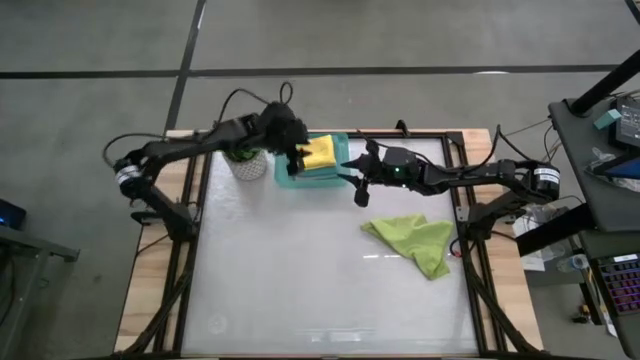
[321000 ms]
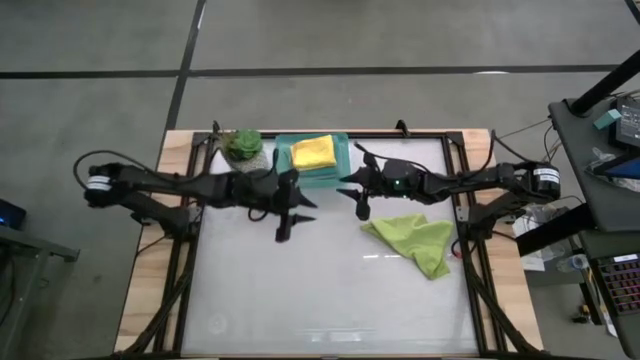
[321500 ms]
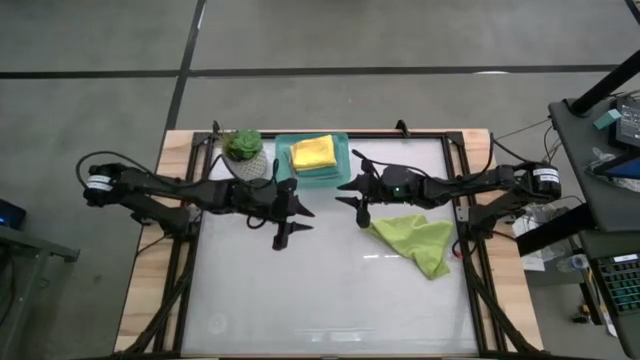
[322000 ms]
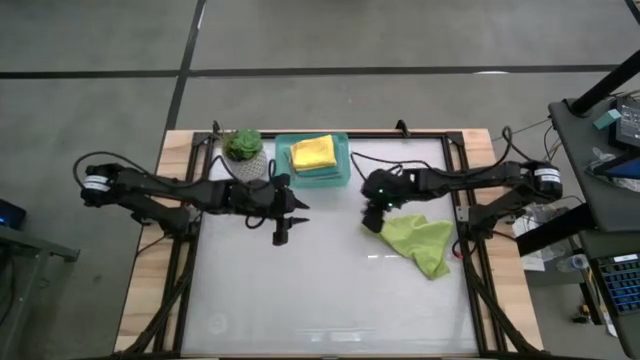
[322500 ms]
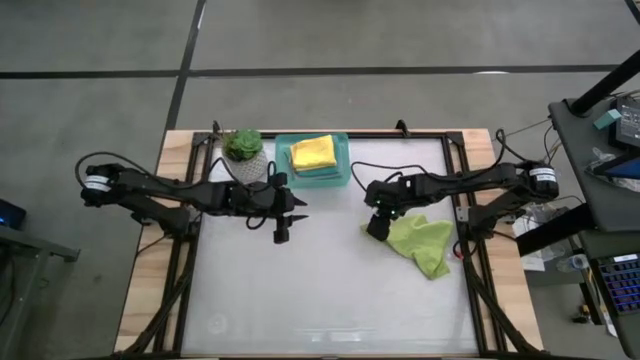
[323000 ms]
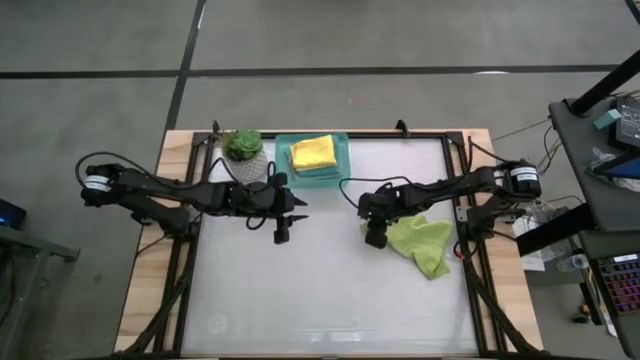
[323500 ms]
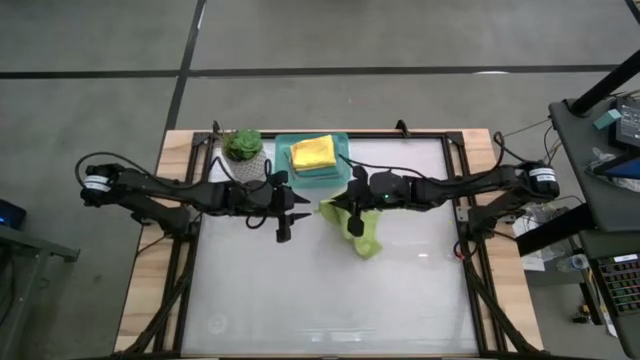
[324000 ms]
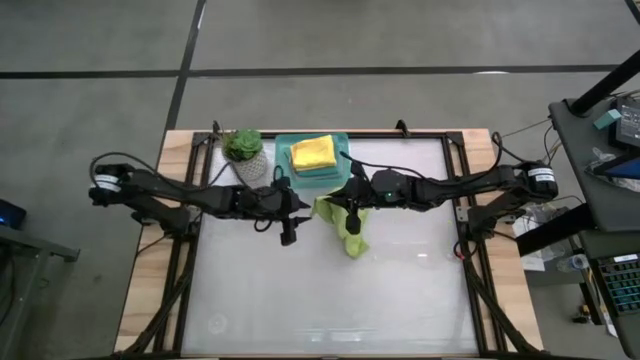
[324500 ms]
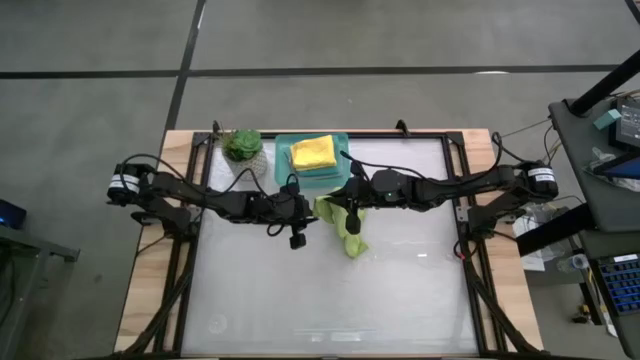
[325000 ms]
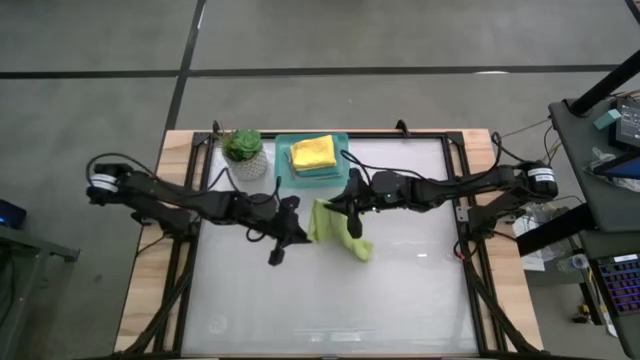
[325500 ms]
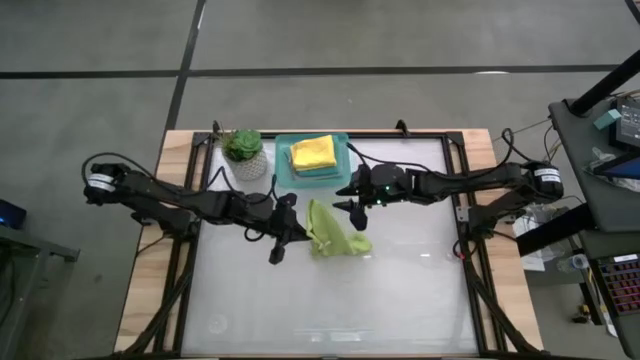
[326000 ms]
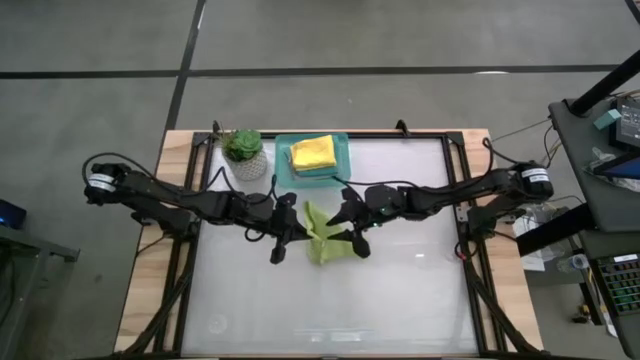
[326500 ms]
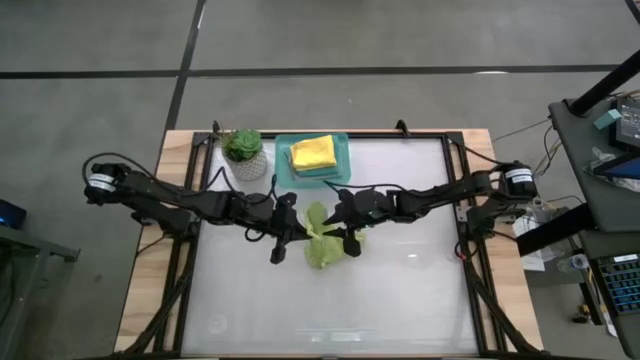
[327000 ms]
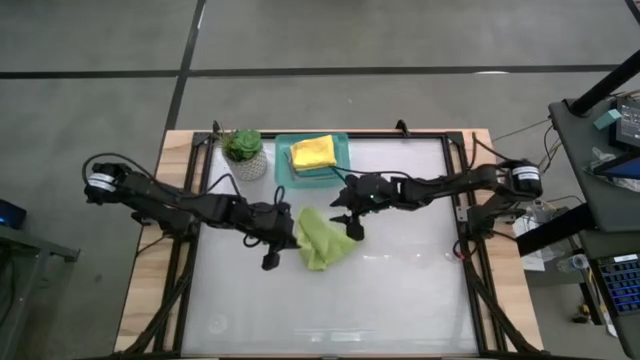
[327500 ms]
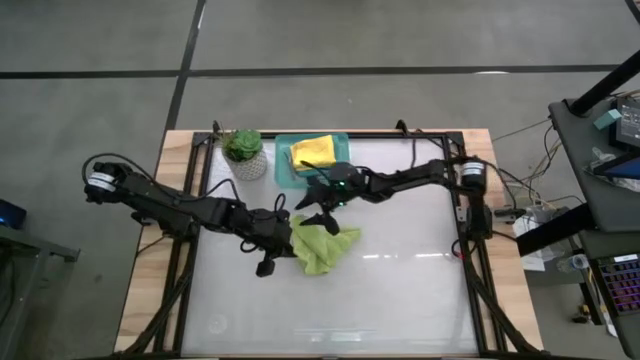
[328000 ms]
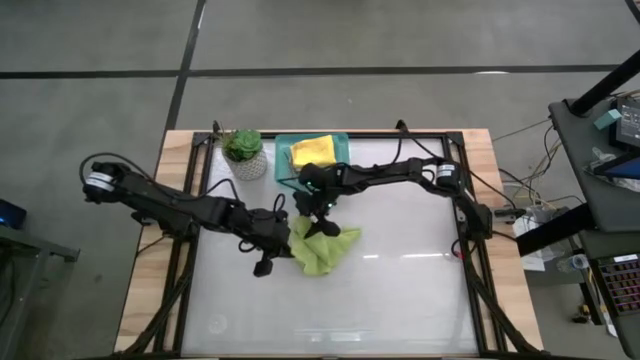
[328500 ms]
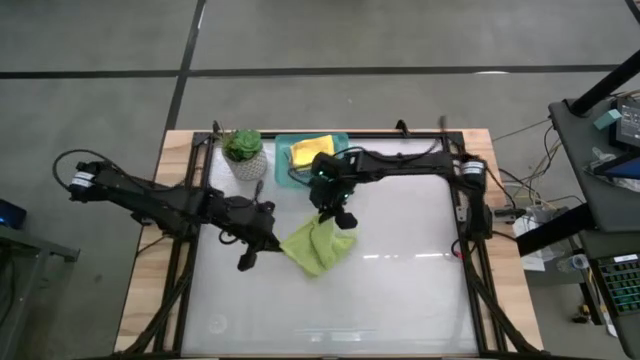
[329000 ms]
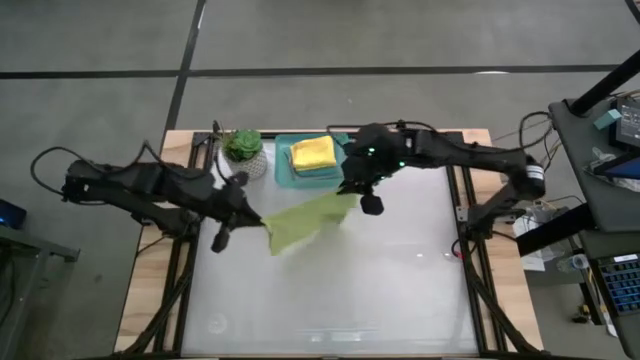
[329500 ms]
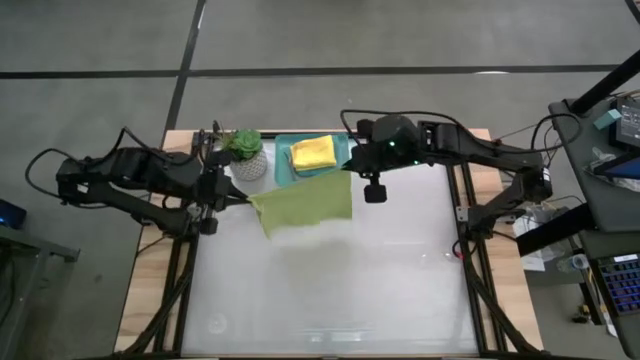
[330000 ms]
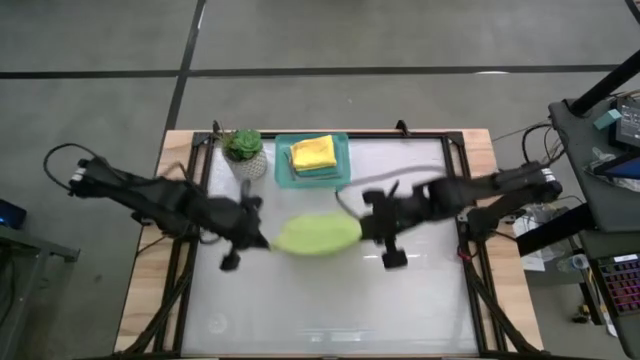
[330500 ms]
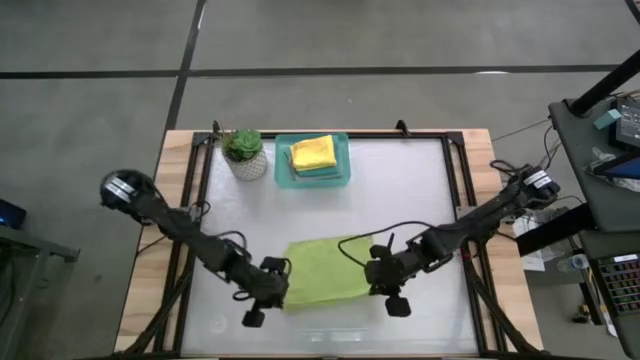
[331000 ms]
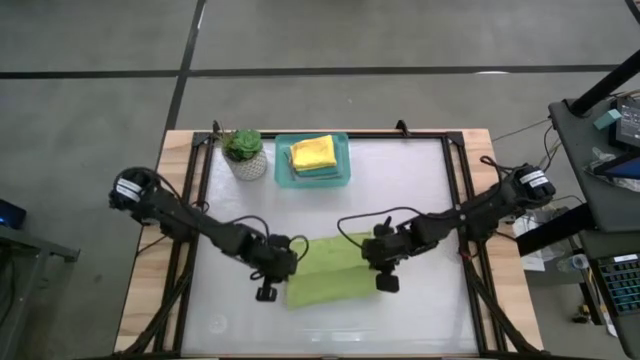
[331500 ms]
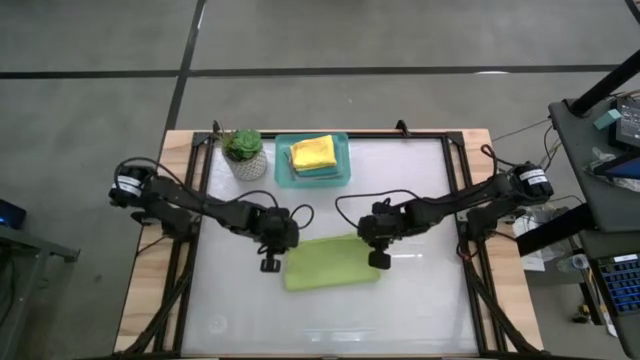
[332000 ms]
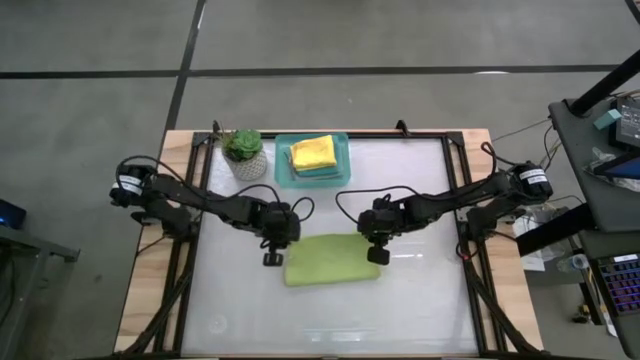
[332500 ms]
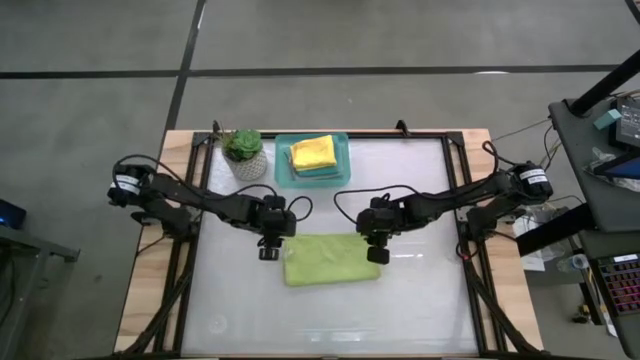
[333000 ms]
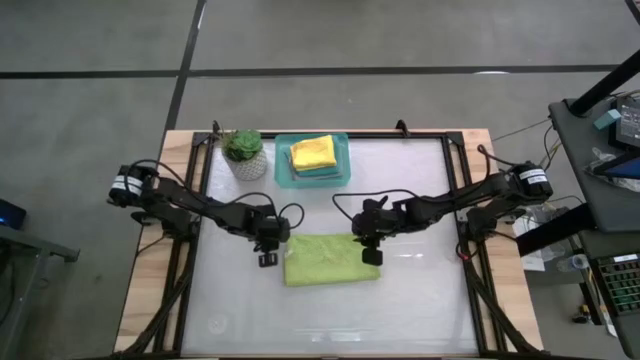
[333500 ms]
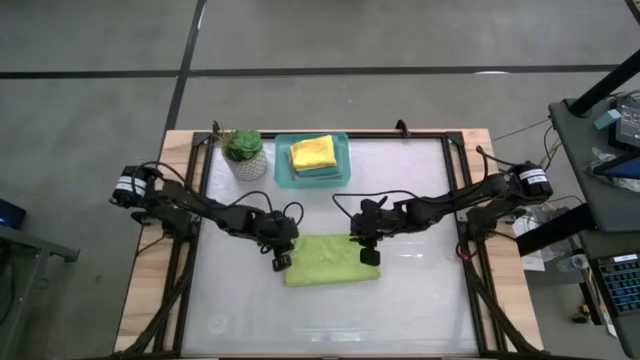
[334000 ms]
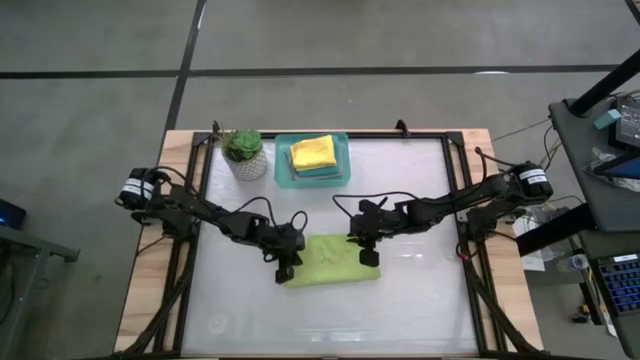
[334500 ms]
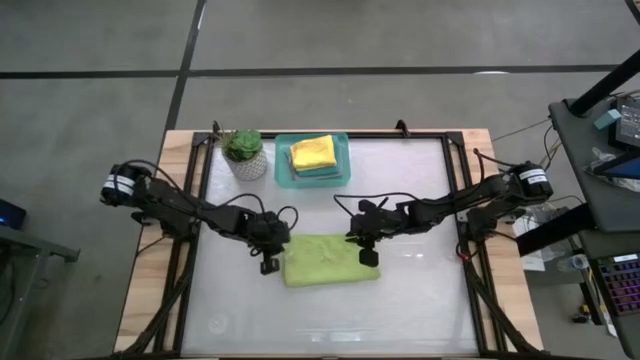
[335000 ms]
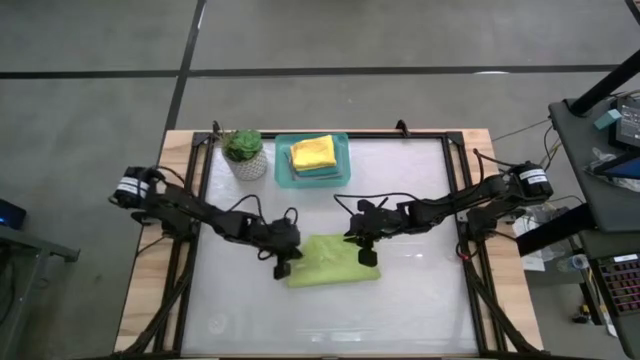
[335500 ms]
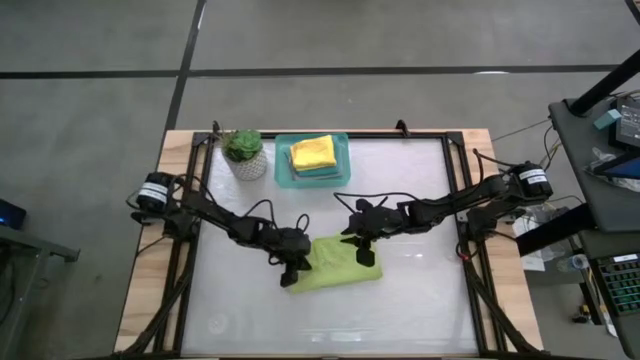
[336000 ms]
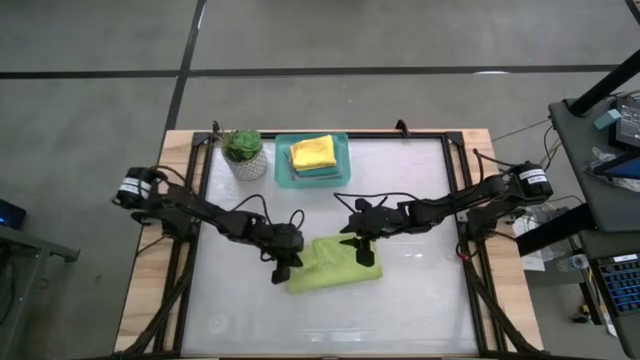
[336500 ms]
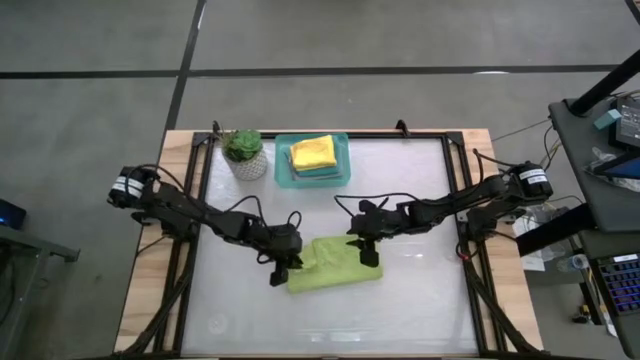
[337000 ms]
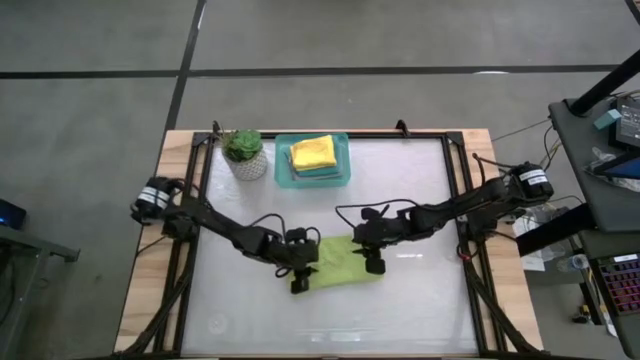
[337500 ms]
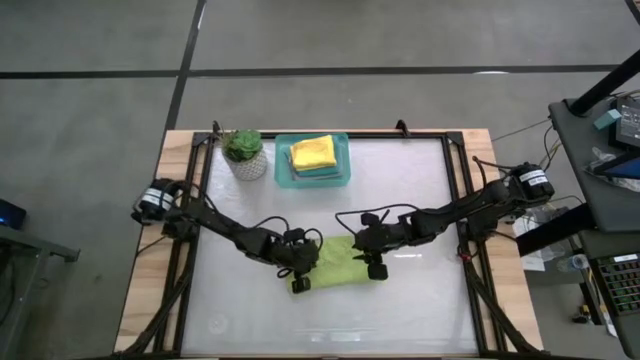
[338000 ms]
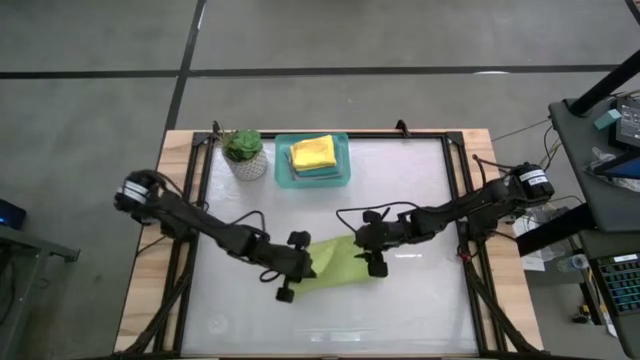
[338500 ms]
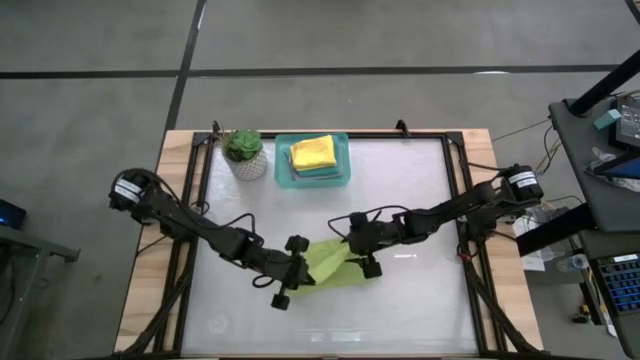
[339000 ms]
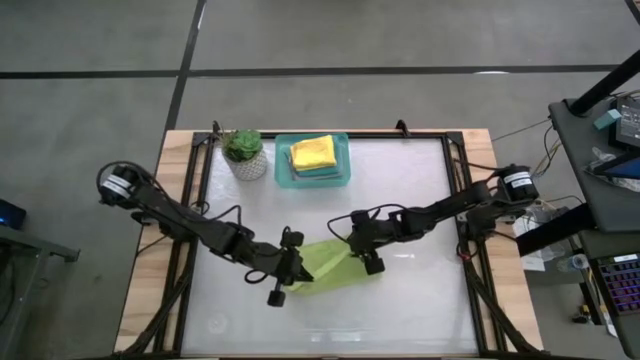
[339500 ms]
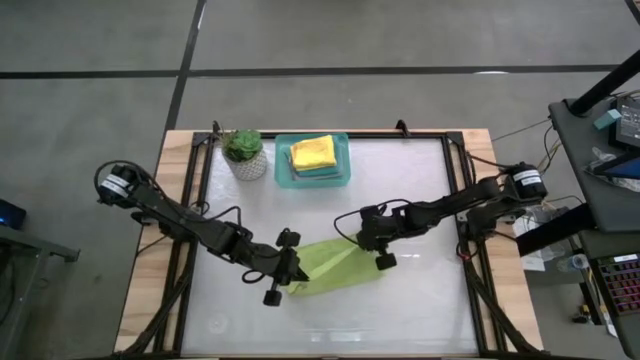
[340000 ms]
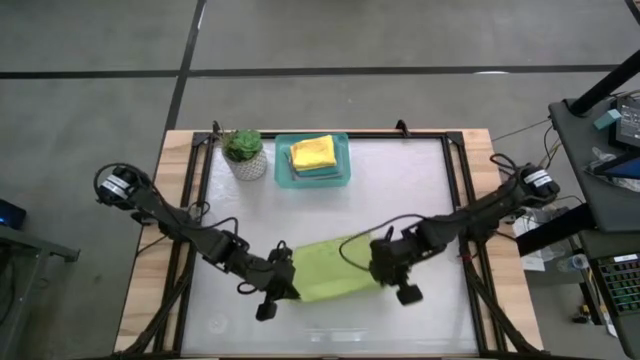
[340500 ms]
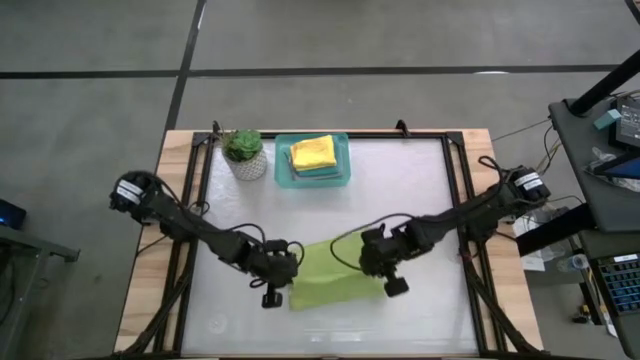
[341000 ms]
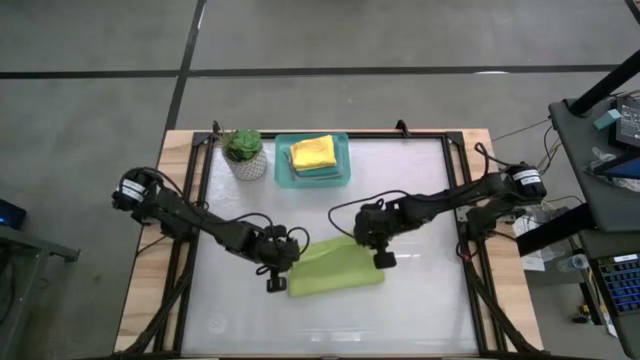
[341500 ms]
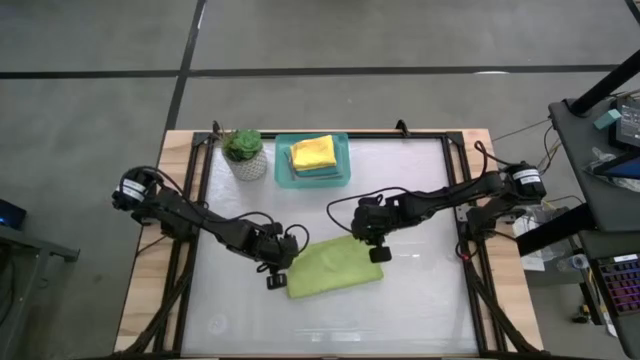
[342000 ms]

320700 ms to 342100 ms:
Task: Fold microfiber towels
Fold the green microfiber cloth
